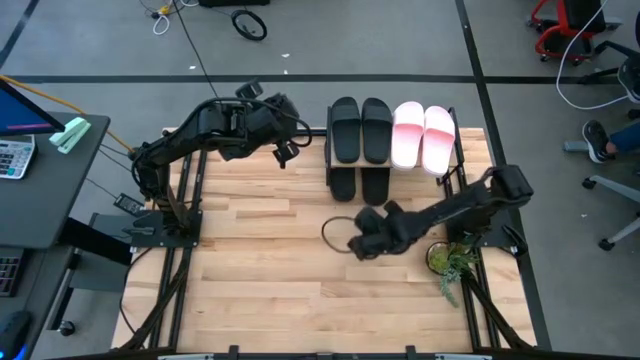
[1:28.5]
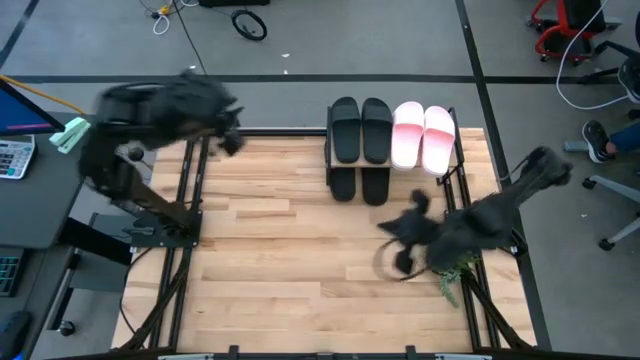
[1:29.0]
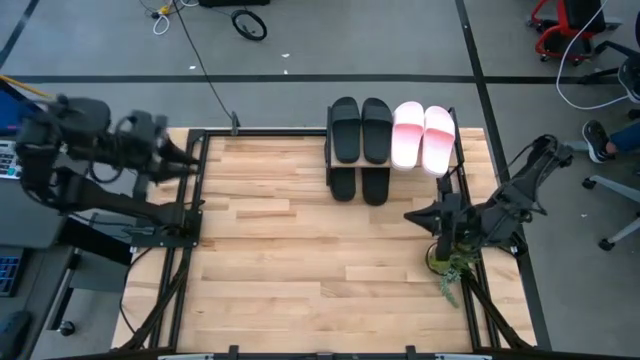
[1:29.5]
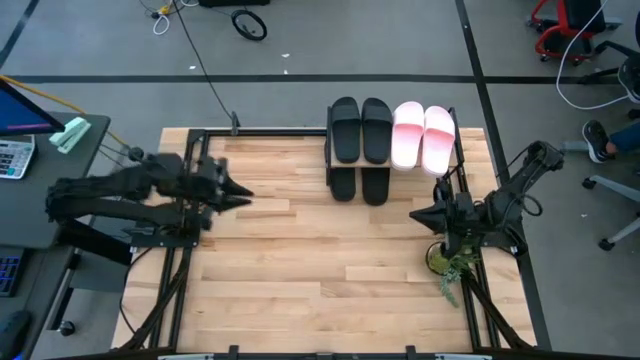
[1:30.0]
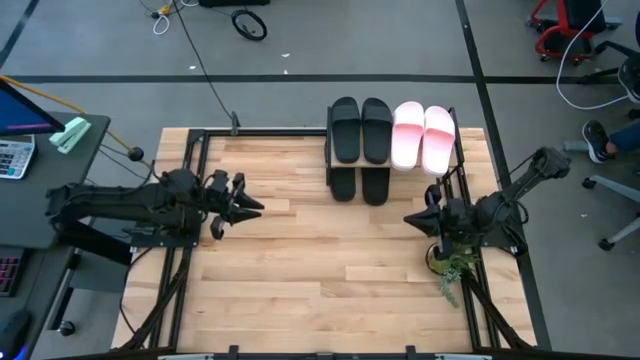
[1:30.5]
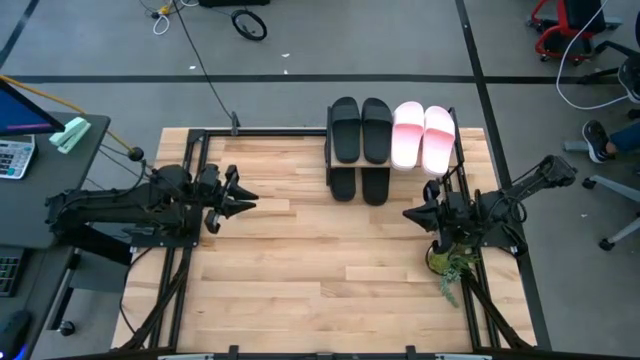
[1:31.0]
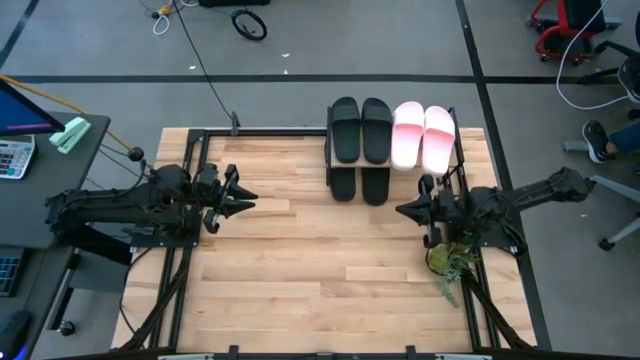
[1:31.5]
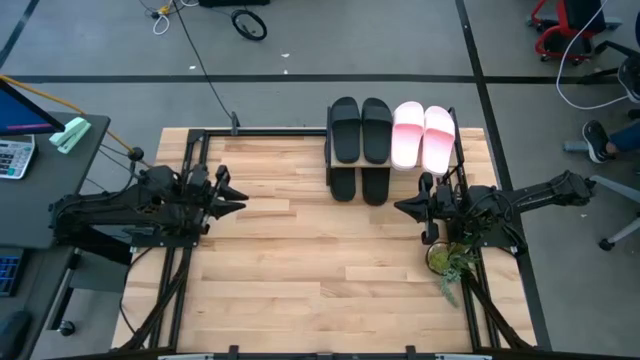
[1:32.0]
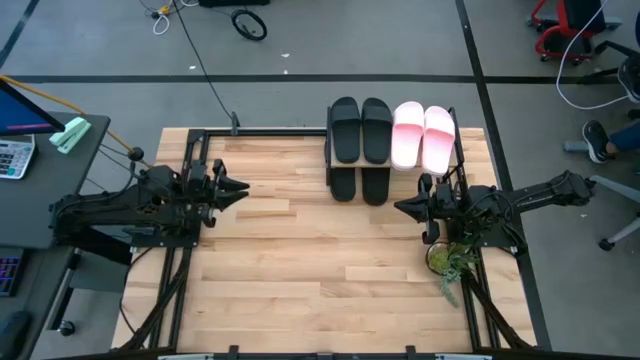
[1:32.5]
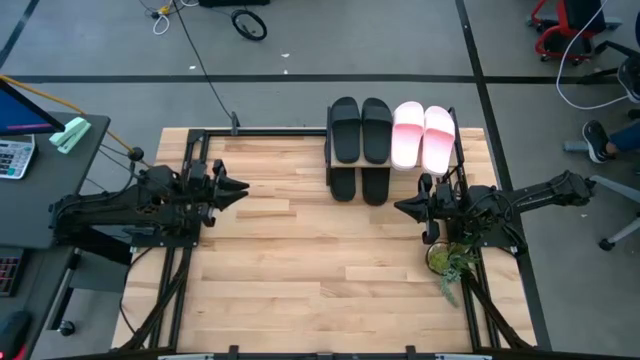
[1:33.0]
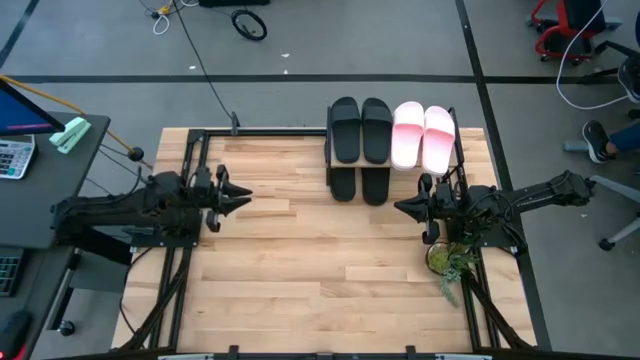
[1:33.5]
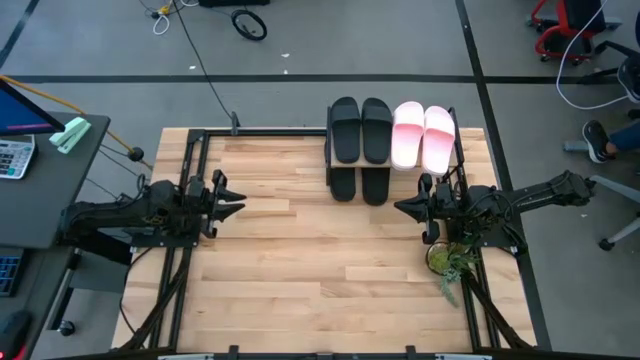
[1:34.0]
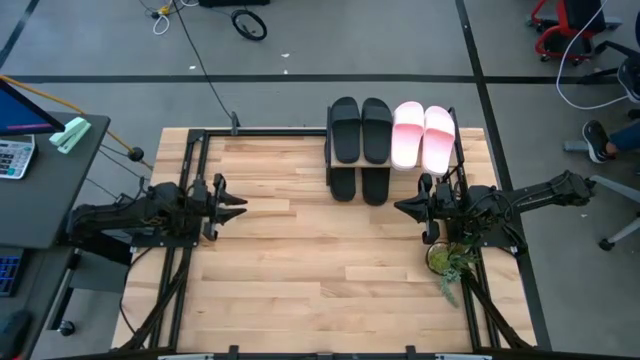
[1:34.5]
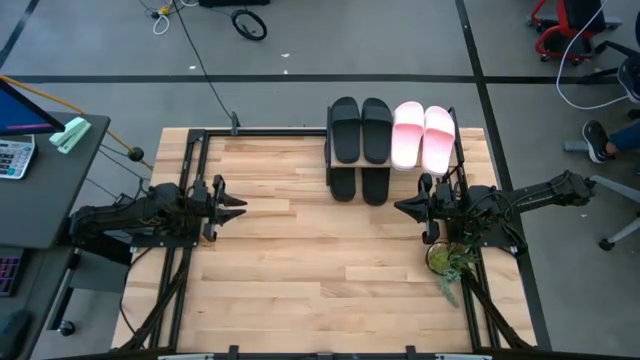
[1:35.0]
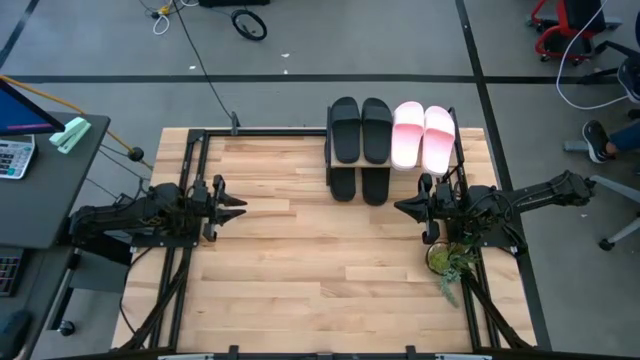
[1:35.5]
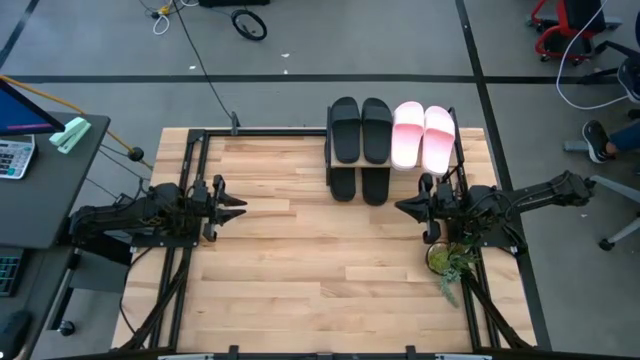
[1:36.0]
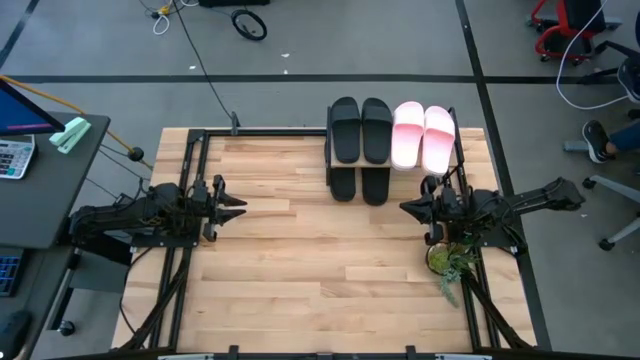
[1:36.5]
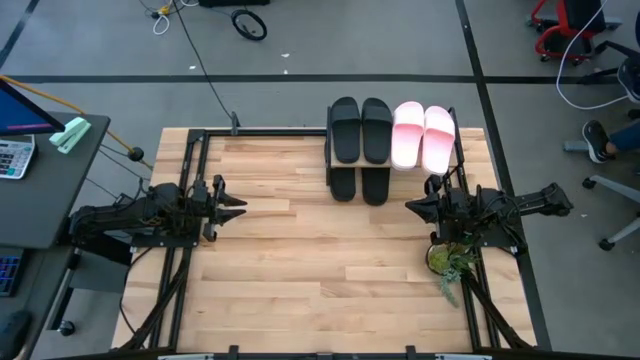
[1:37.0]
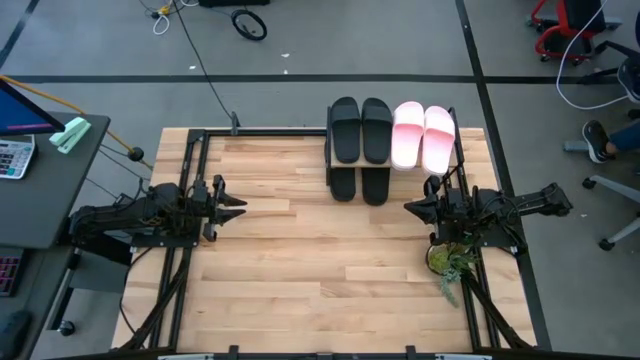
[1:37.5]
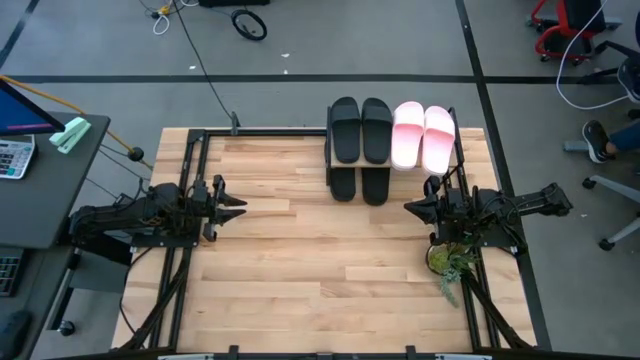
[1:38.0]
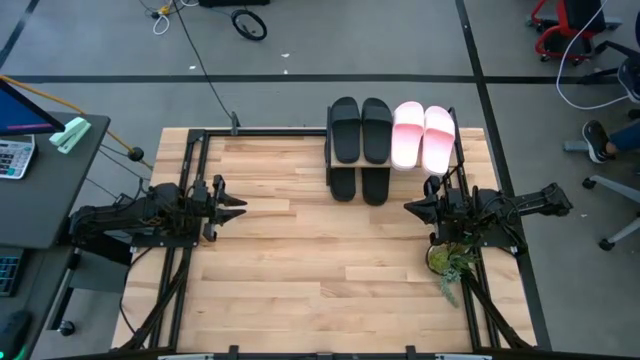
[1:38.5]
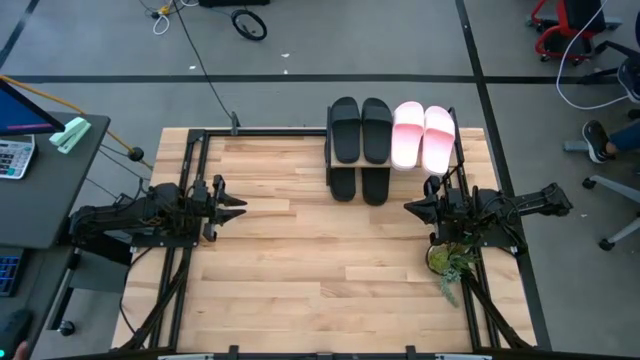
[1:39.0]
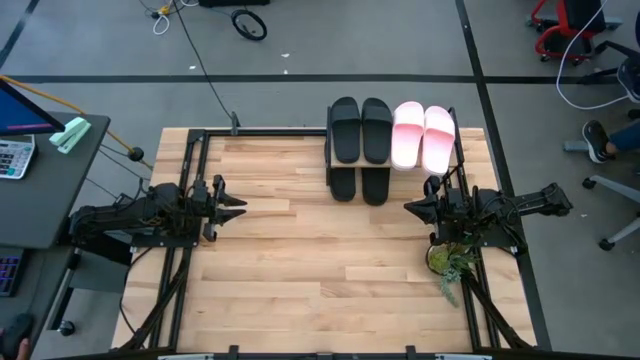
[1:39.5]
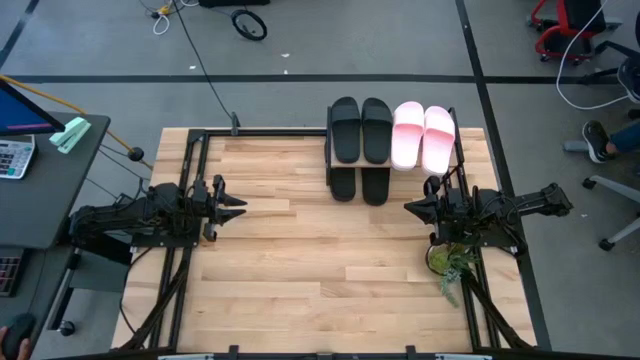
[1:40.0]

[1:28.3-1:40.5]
Task: Pick and place slides into the shelf
Return to Home Position

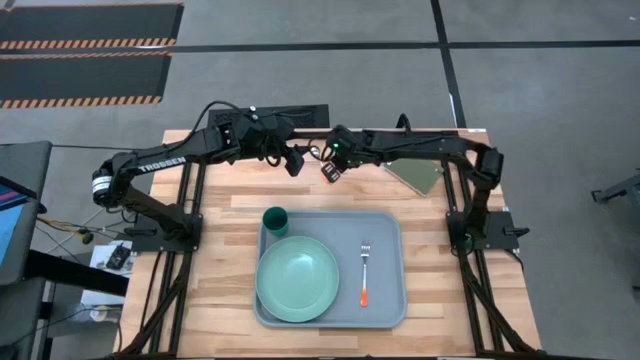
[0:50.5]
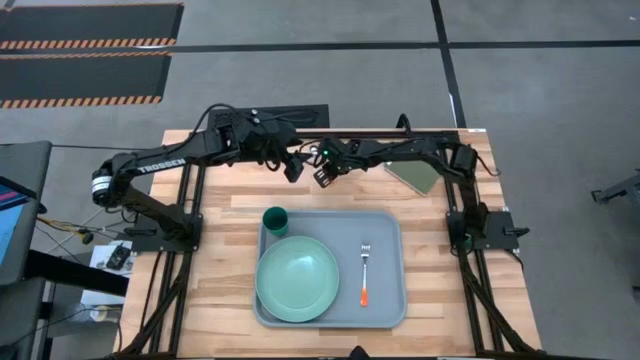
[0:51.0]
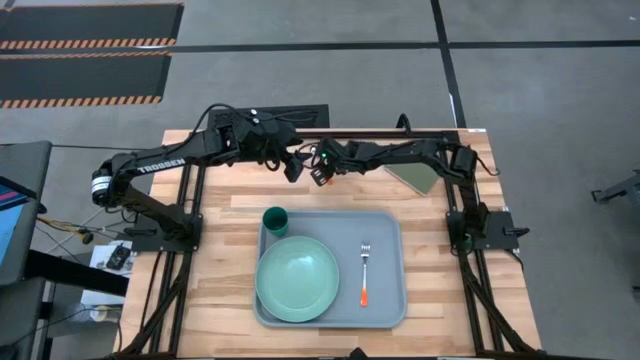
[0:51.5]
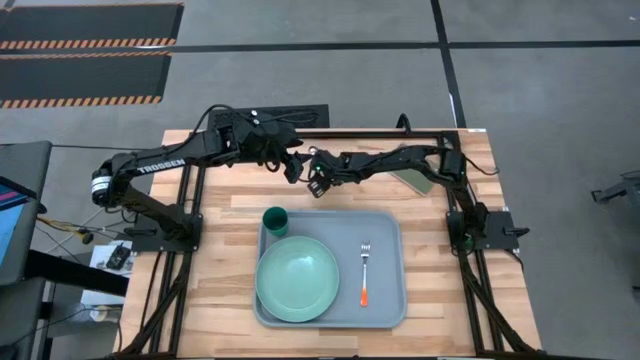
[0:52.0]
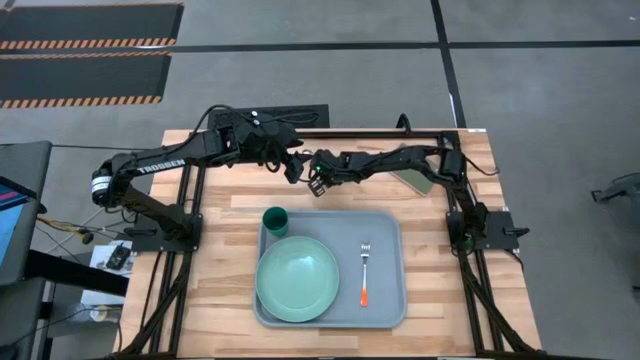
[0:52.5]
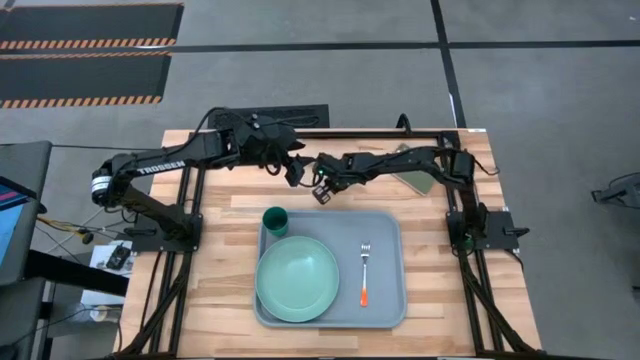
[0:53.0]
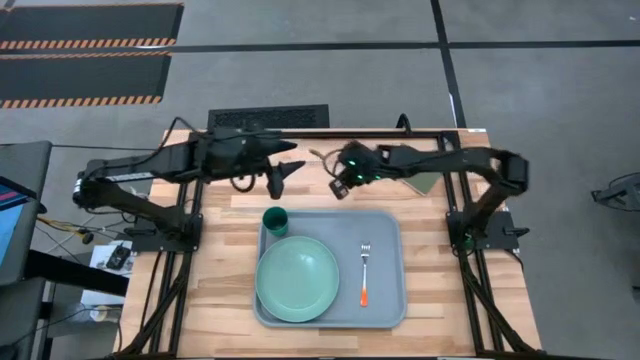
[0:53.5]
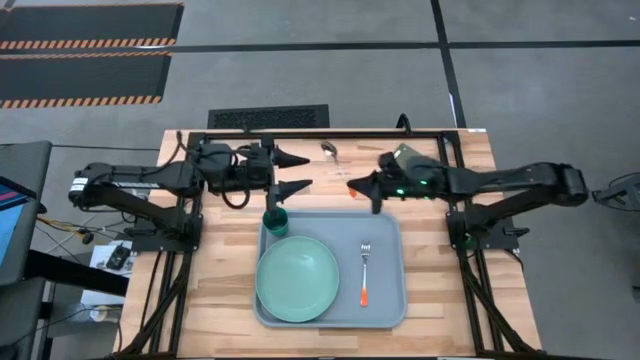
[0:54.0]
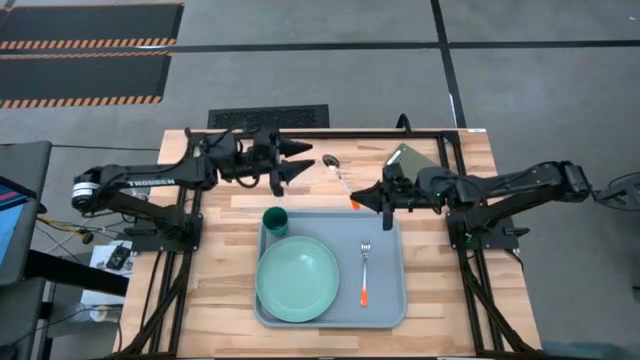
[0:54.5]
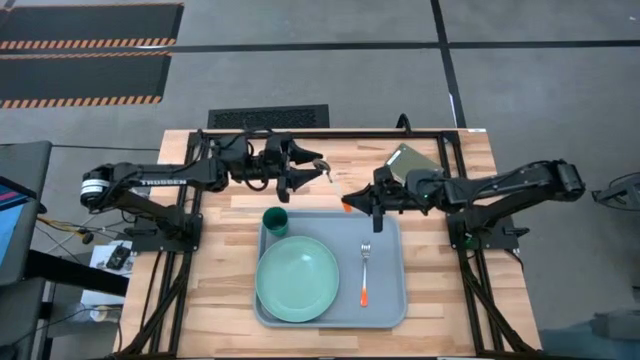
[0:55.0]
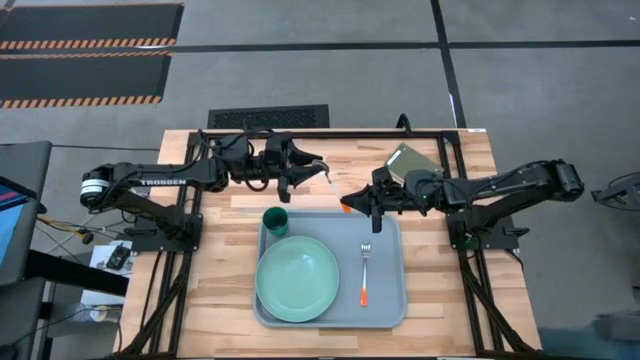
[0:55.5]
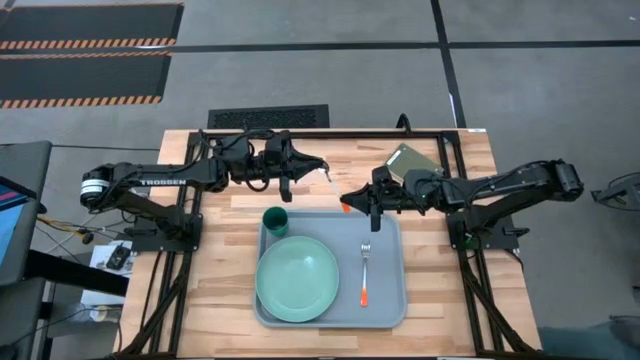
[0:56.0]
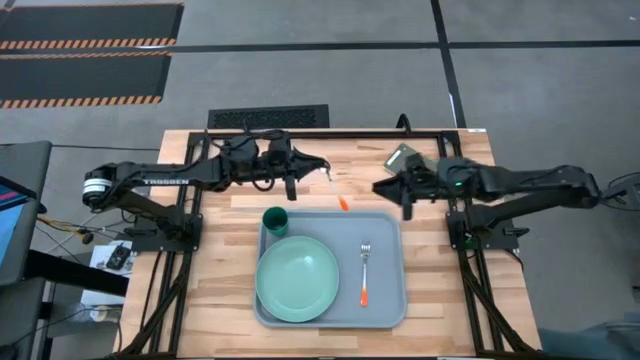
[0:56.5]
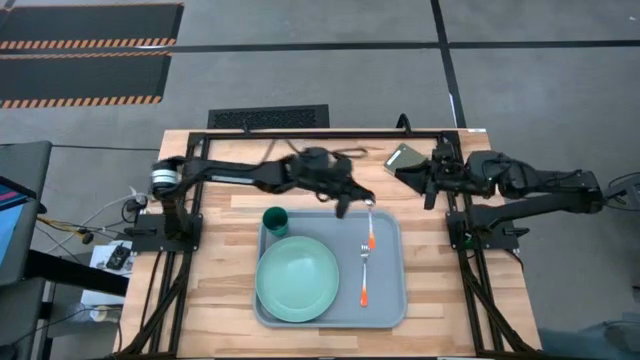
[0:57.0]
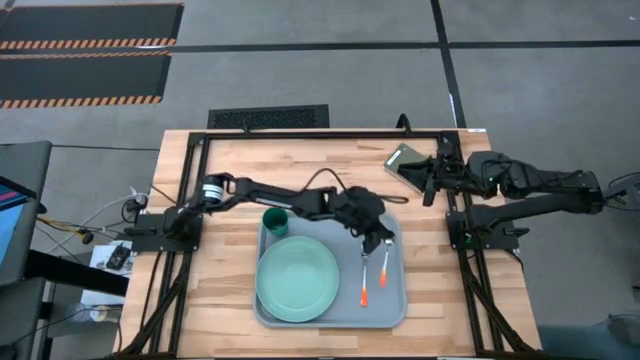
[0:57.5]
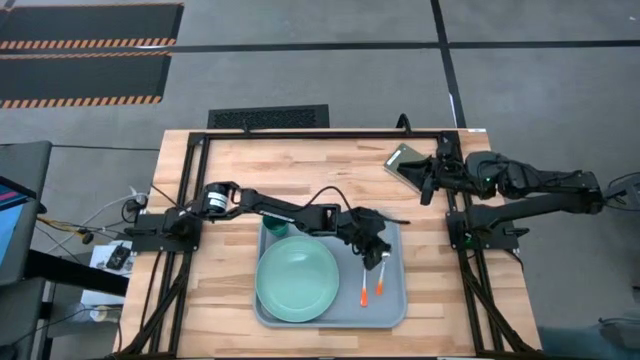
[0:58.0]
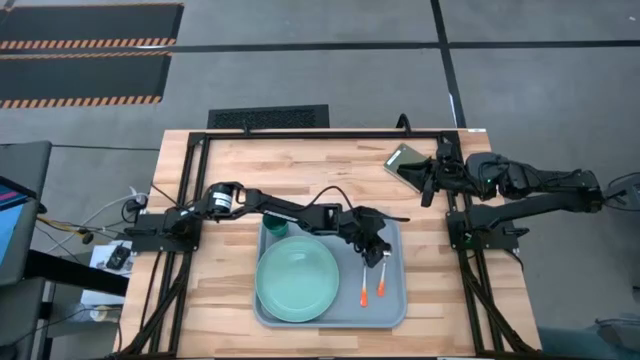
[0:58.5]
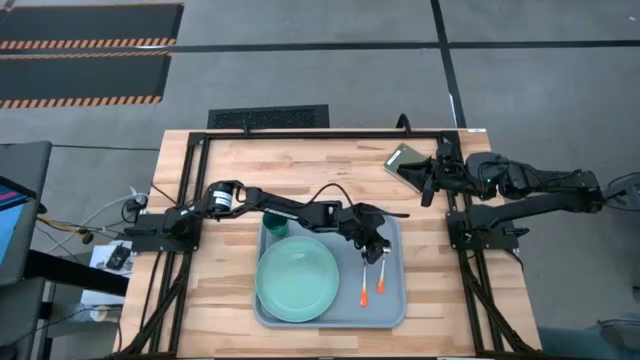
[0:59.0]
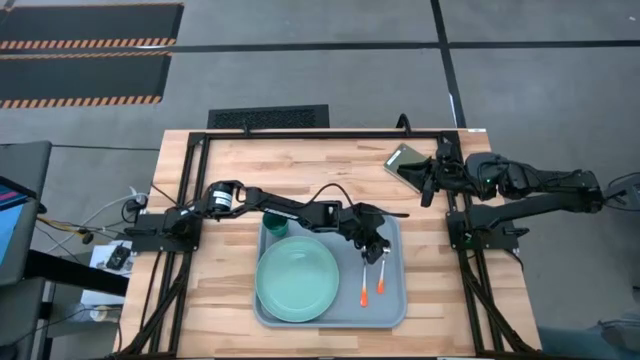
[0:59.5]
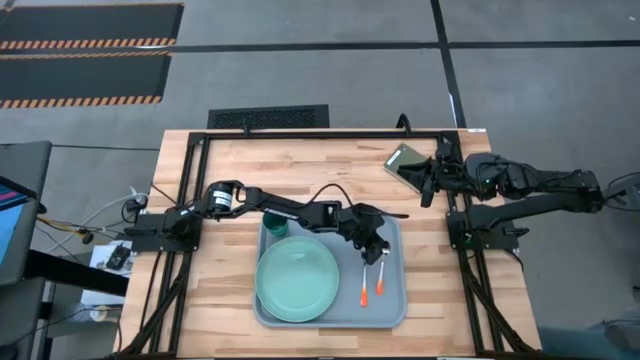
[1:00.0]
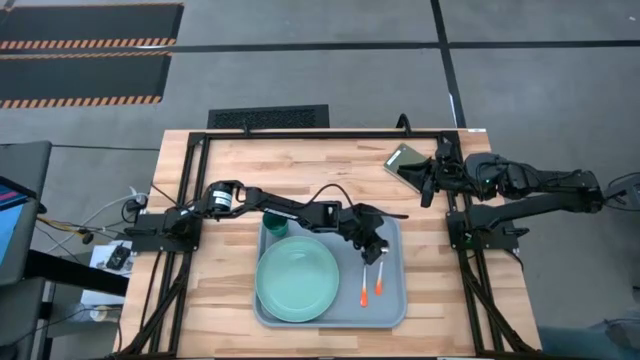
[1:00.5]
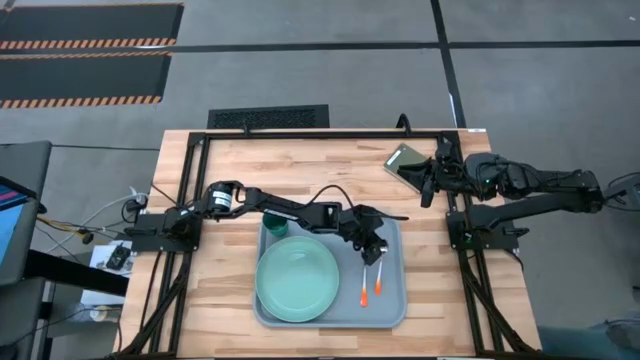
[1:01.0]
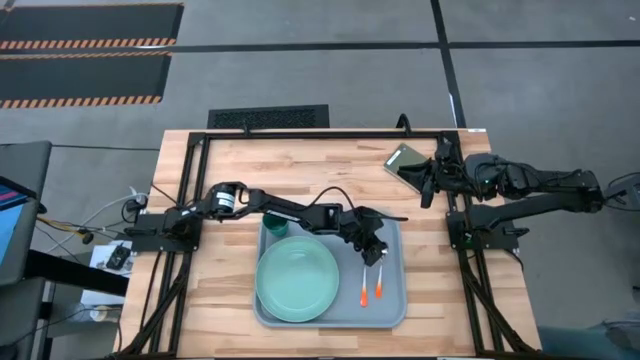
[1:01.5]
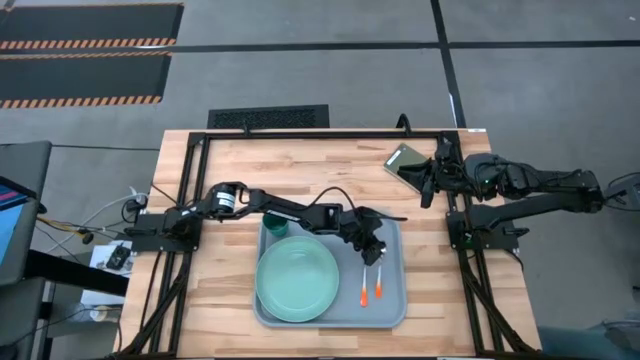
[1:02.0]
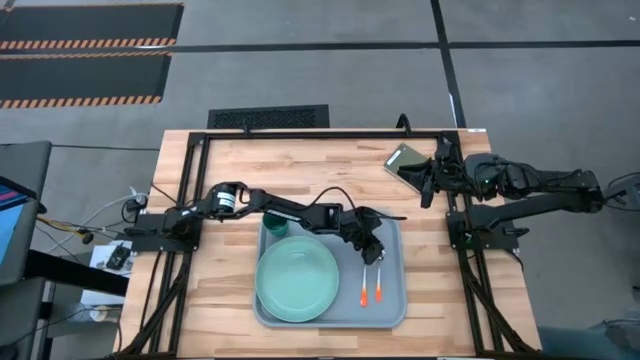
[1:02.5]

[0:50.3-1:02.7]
Task: Pick and place plate/cup/fork/spoon on tray
Put the orange spoon on the gray tray to the right of the orange fork
